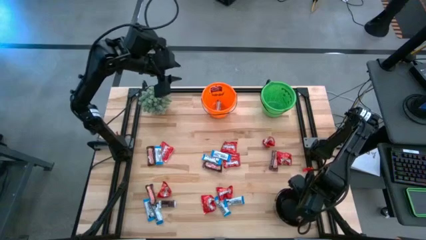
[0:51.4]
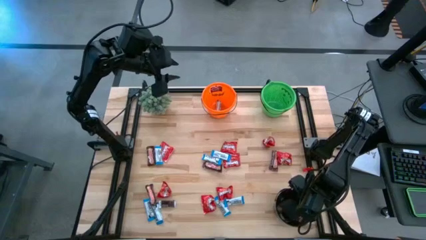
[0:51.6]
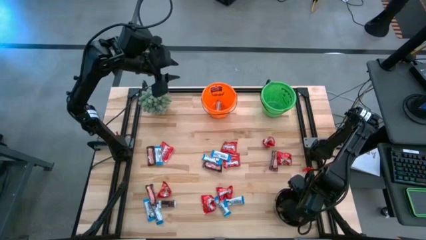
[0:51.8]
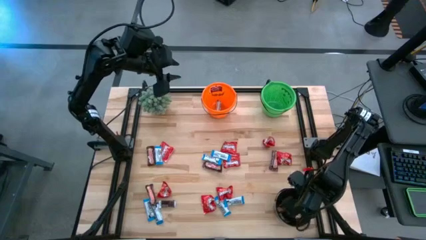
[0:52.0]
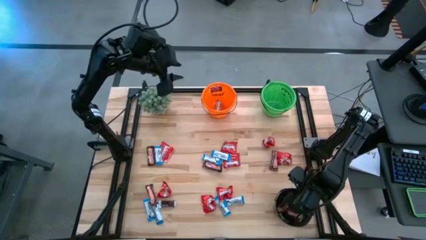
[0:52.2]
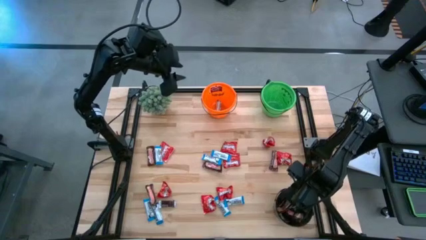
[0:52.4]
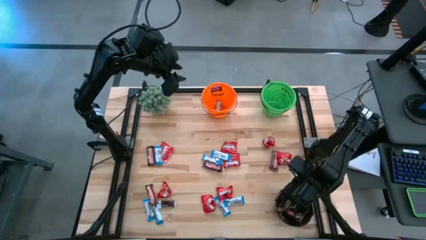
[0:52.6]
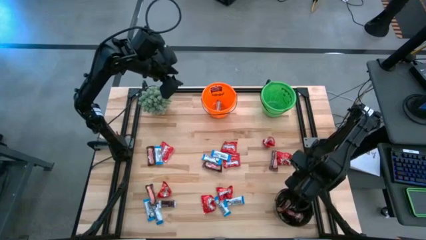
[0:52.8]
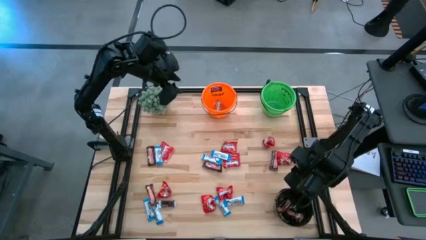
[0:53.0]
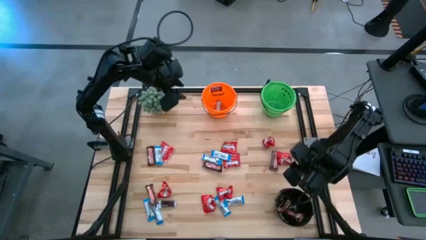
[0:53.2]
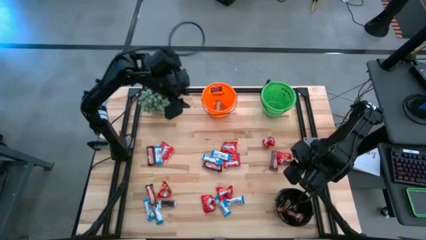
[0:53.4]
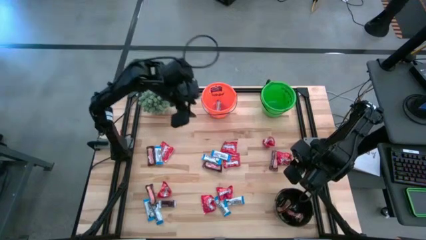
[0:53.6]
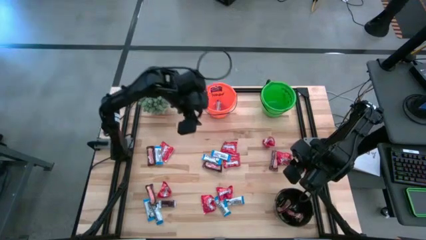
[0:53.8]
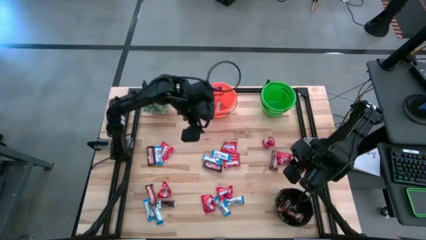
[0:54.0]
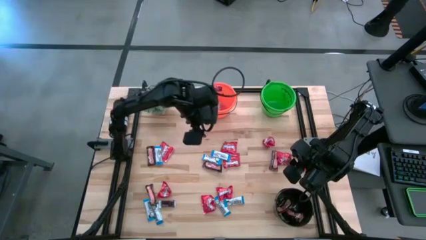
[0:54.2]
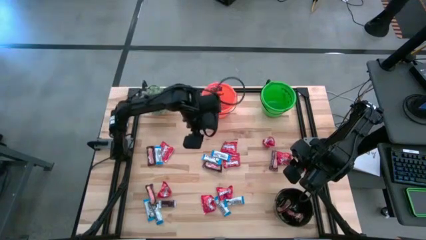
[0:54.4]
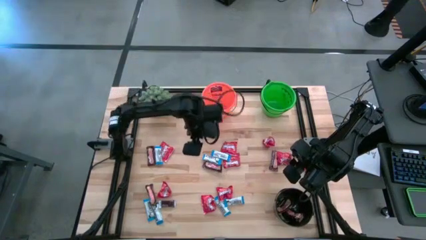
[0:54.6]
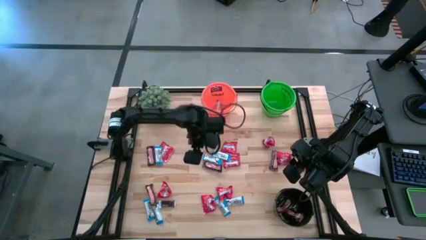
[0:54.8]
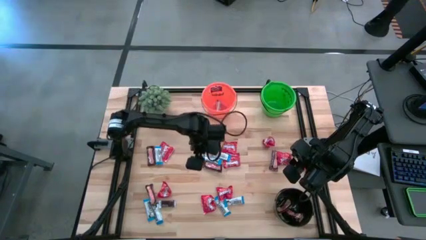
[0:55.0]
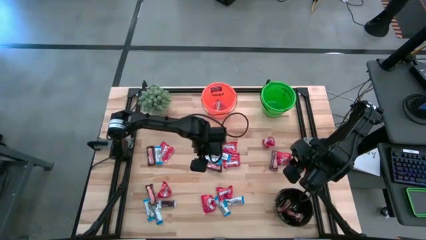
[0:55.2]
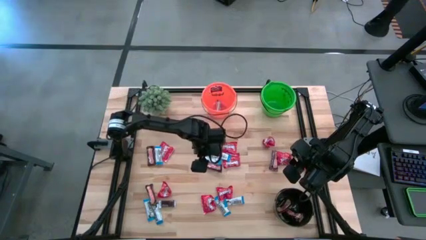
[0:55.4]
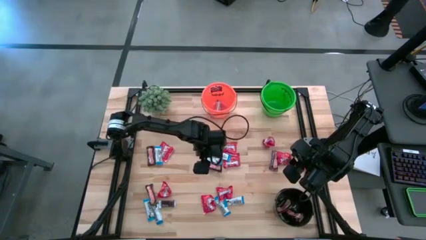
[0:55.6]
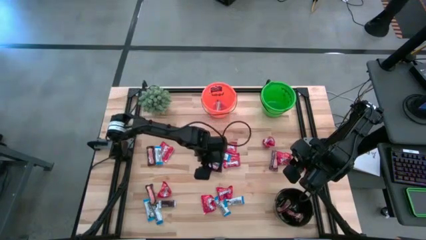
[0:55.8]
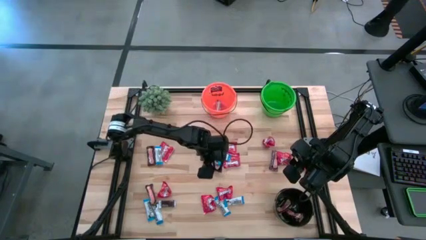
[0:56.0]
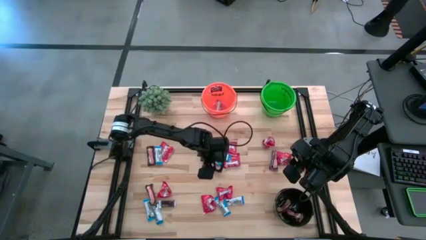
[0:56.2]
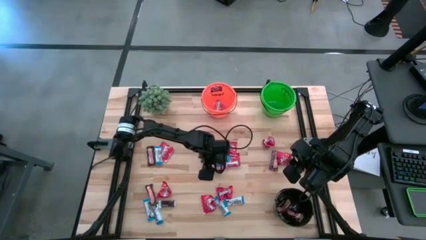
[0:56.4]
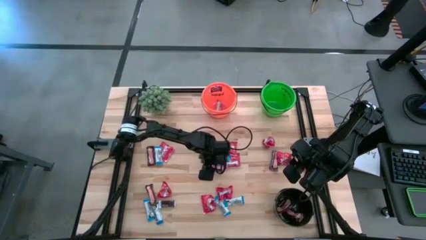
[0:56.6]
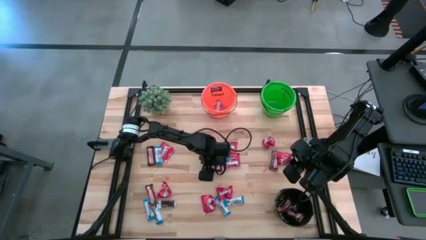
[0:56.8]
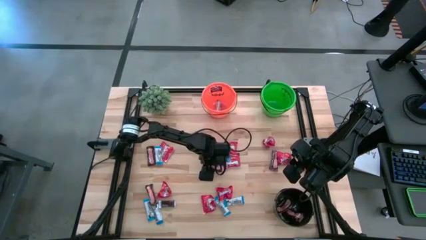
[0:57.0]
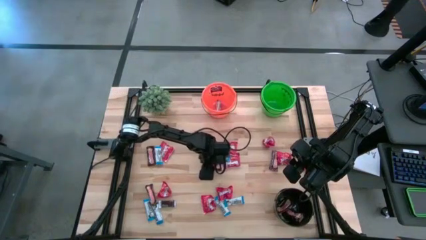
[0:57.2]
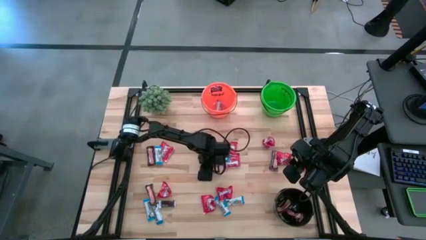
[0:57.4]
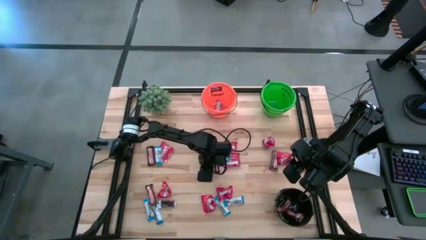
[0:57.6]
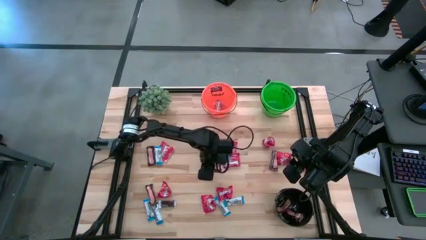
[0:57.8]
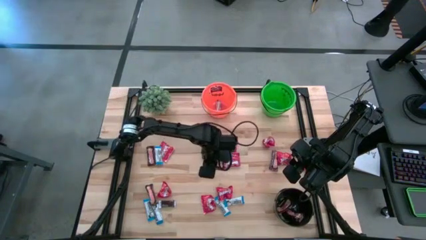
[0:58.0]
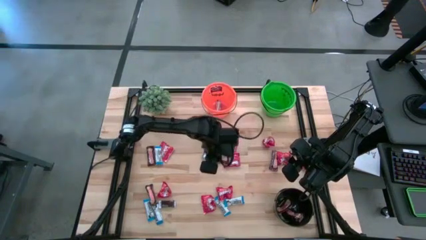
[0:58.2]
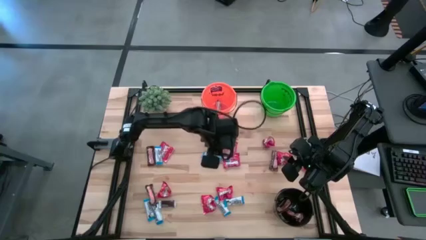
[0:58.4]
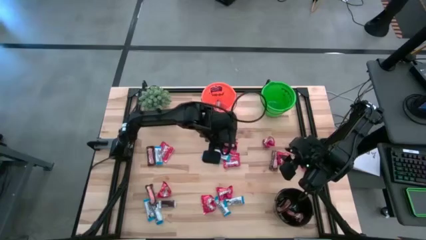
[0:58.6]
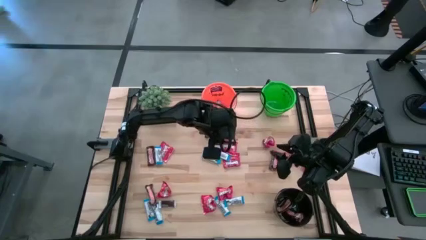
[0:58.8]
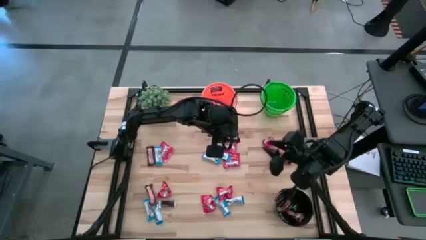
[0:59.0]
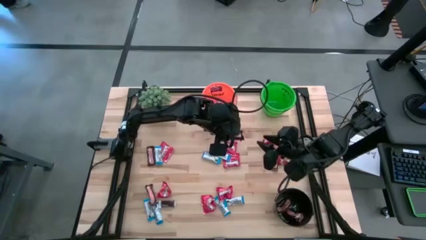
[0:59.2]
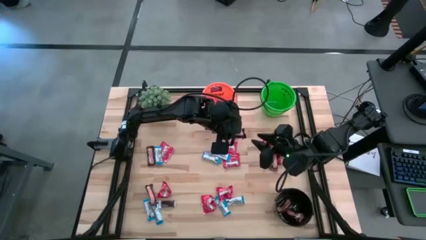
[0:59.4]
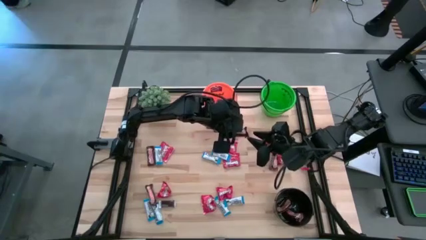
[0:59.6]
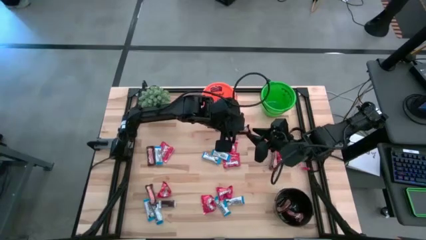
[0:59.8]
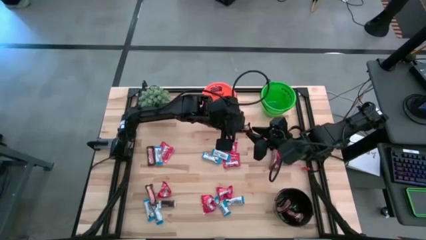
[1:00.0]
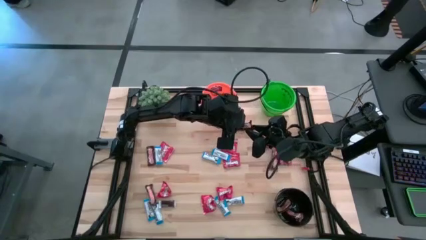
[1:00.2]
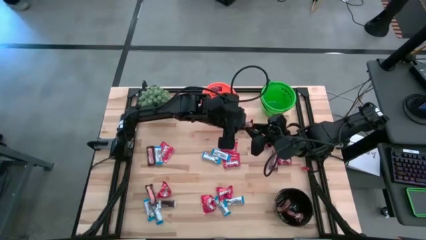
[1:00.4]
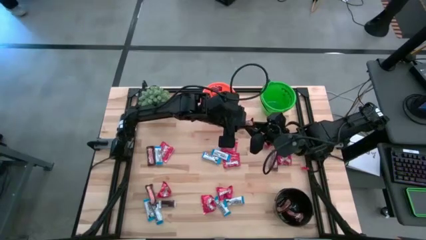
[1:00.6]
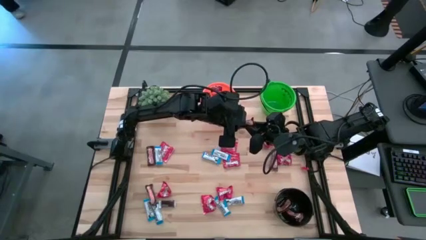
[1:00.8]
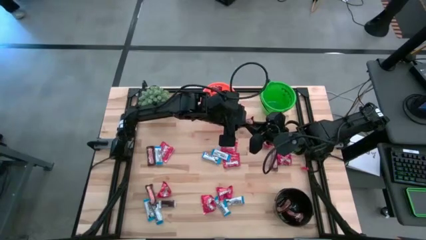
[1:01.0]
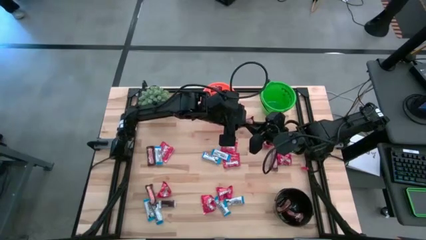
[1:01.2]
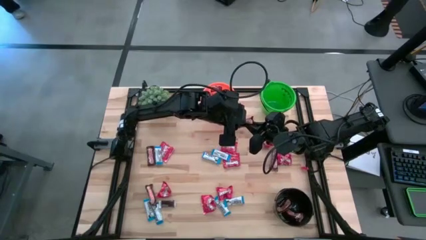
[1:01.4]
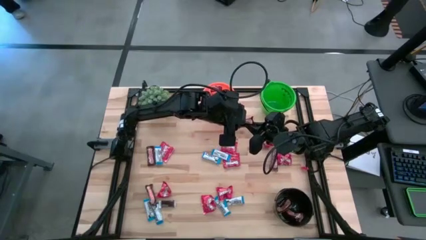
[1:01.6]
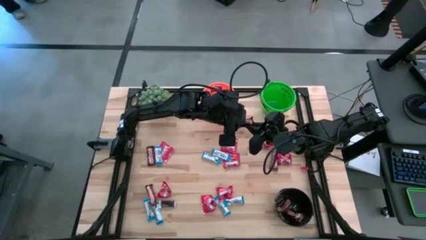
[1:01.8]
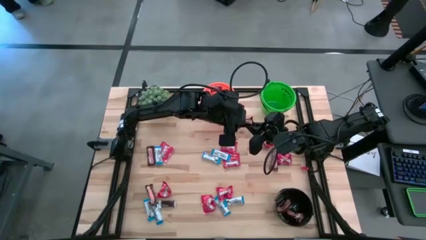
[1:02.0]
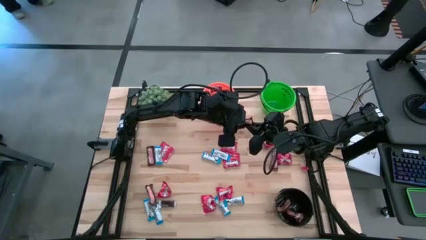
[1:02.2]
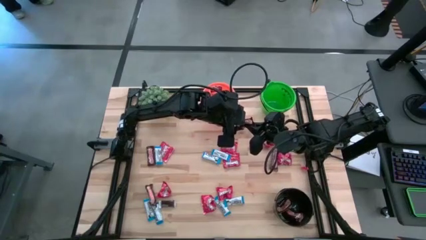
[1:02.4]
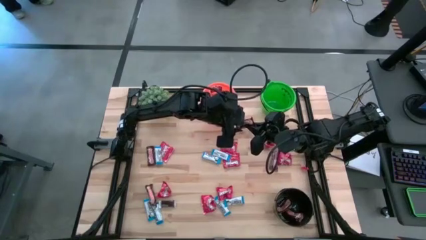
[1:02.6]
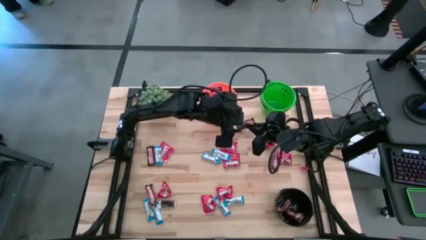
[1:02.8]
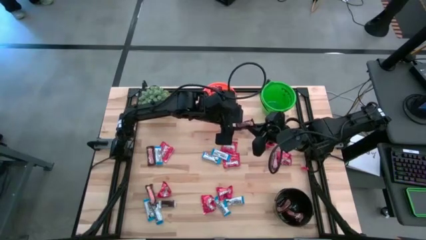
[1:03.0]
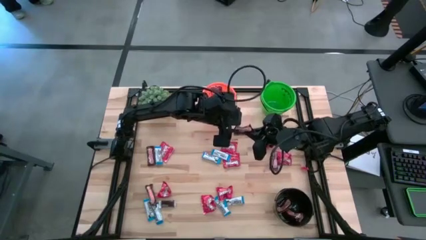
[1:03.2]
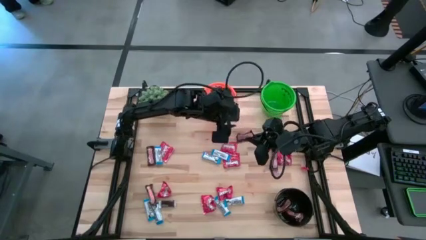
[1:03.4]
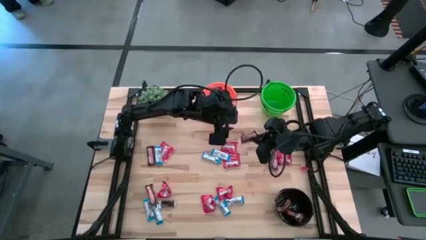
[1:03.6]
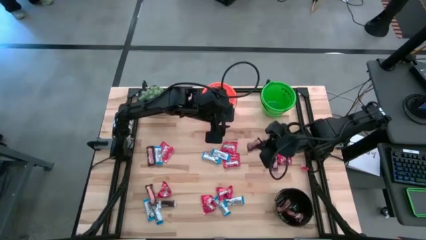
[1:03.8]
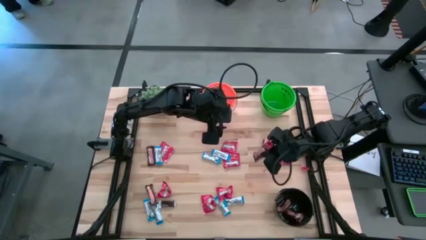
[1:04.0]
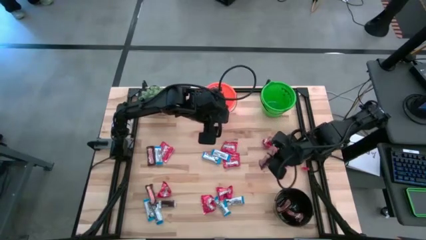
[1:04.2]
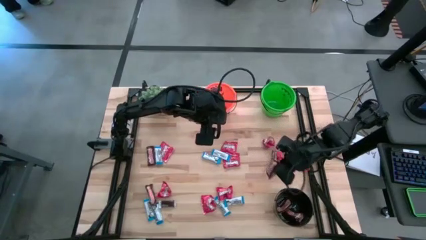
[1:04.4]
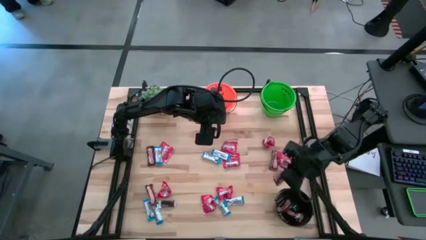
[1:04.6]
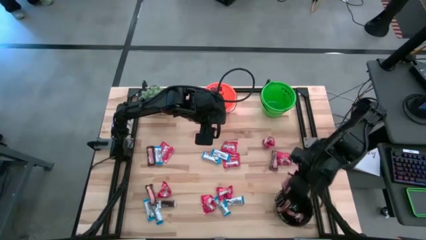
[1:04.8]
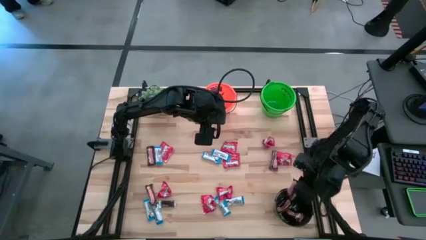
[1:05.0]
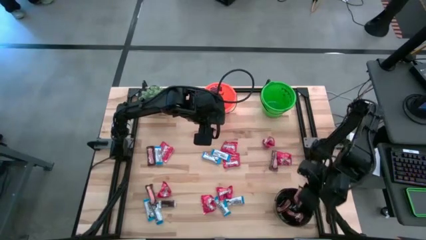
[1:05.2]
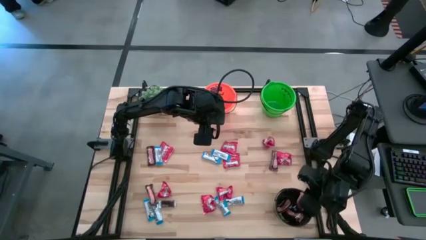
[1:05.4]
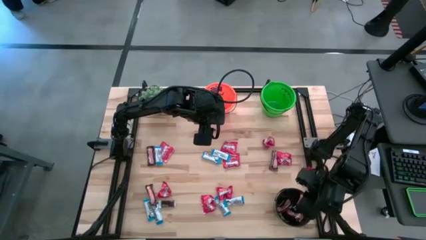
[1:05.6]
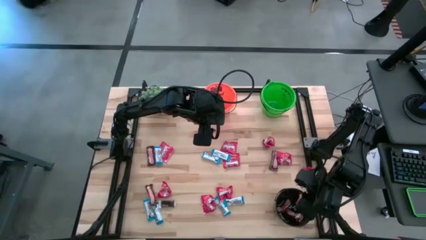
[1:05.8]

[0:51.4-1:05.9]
Task: Organize candy in baskets
Put the brown chocolate bar into the black bucket
